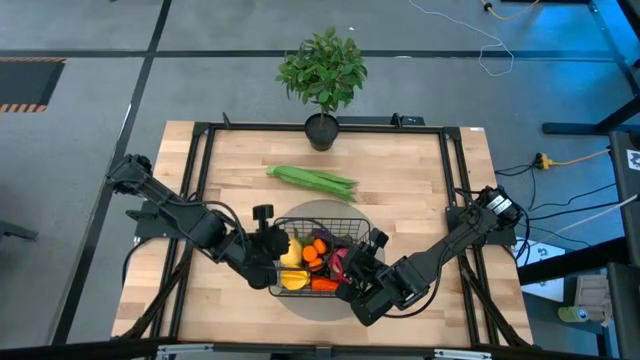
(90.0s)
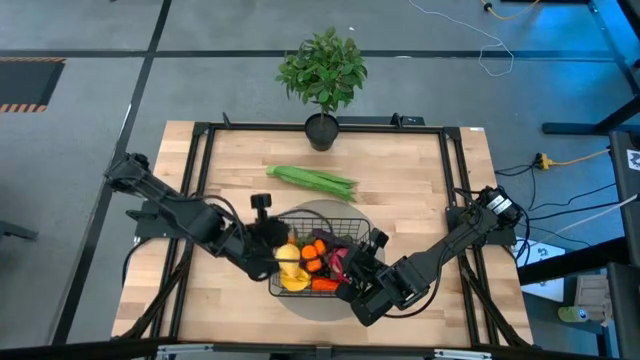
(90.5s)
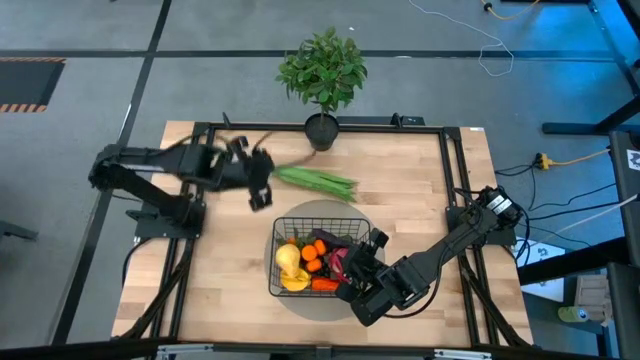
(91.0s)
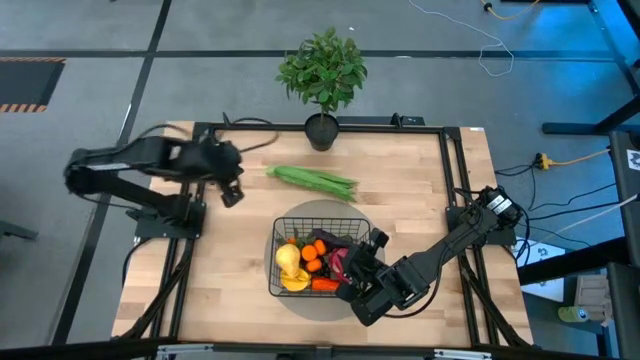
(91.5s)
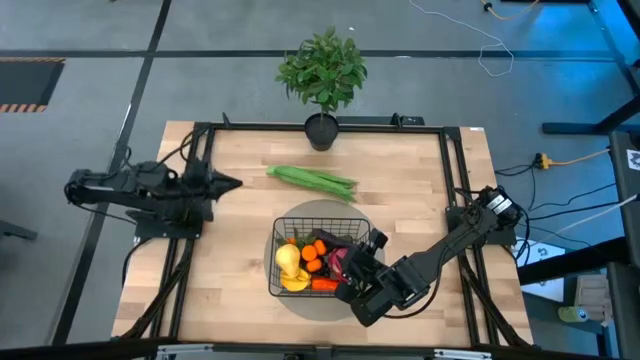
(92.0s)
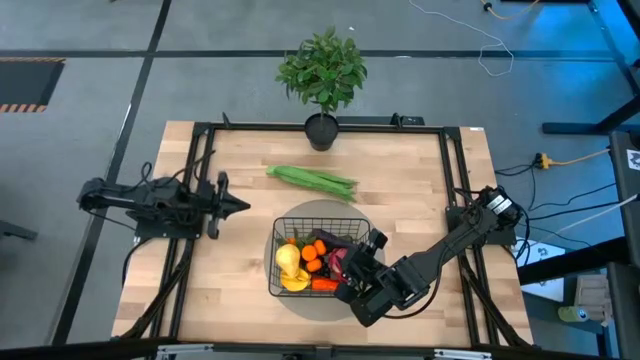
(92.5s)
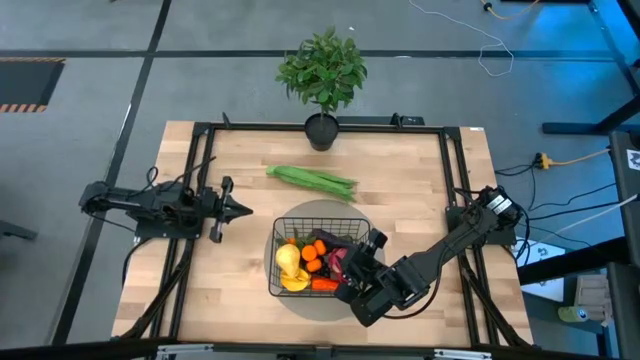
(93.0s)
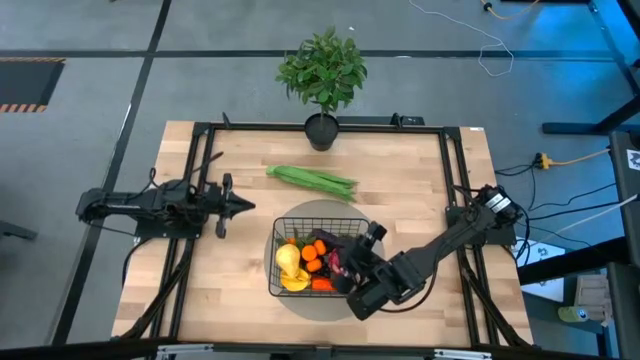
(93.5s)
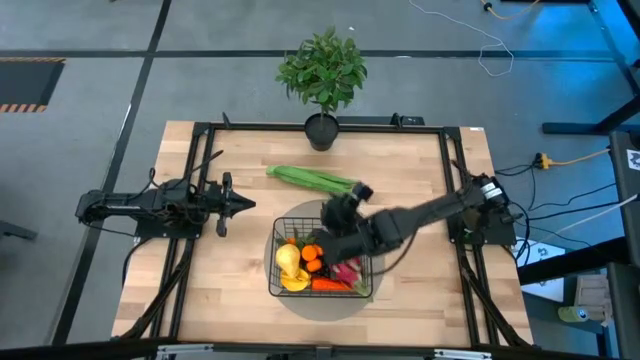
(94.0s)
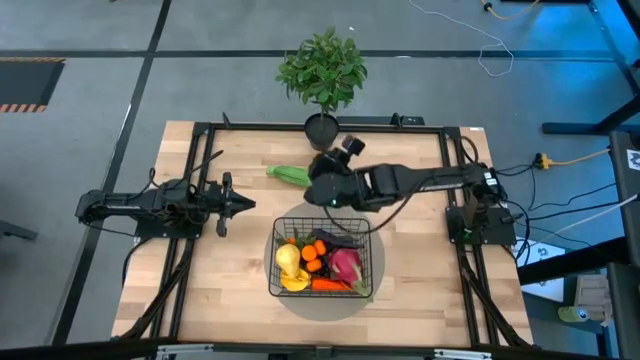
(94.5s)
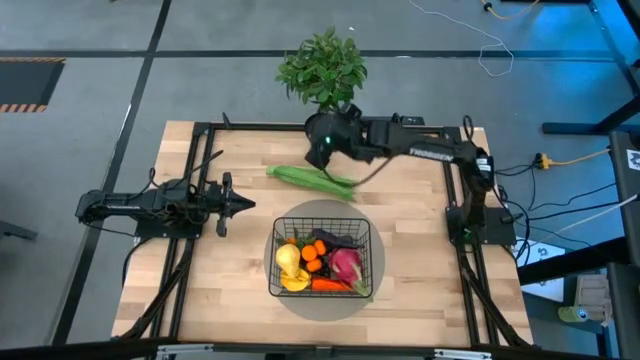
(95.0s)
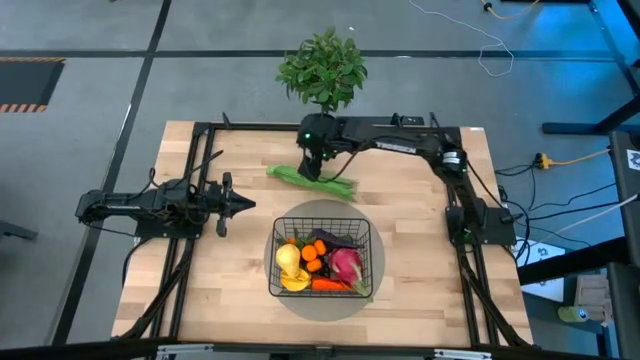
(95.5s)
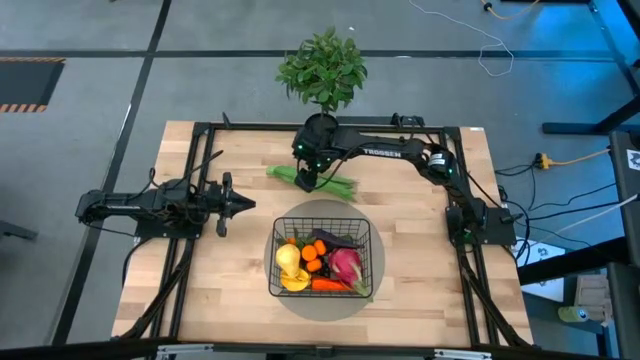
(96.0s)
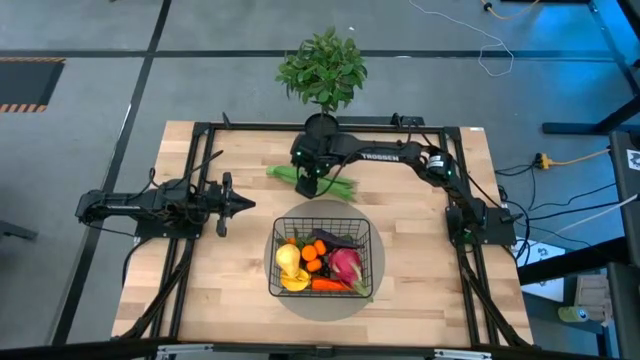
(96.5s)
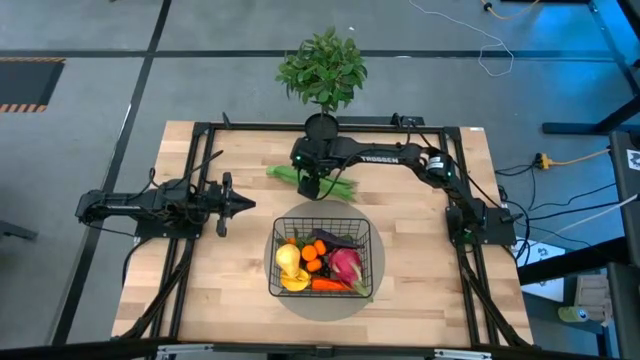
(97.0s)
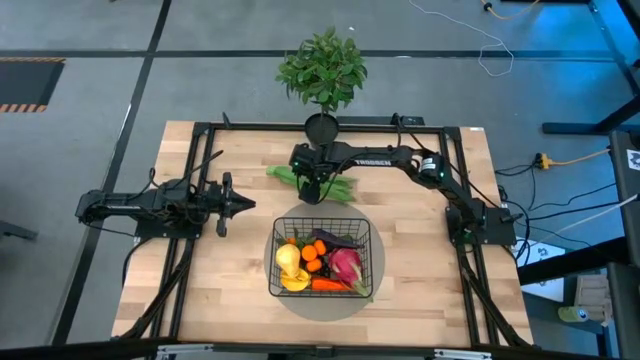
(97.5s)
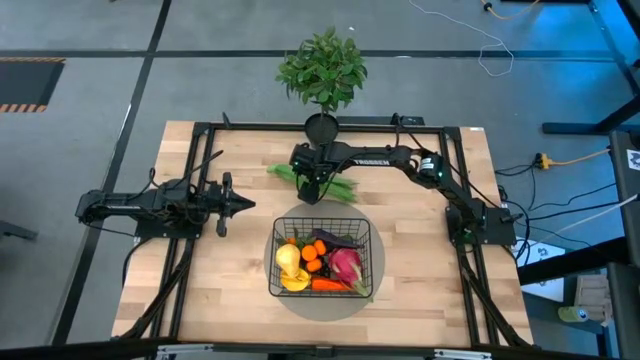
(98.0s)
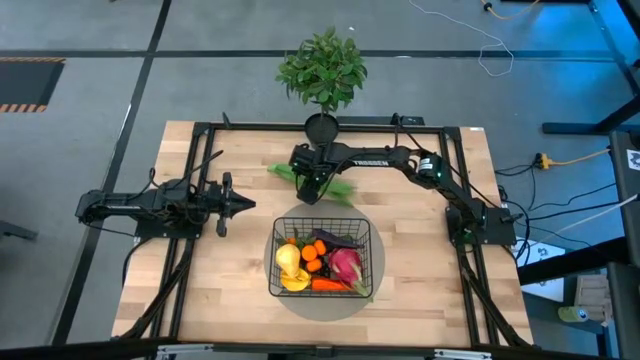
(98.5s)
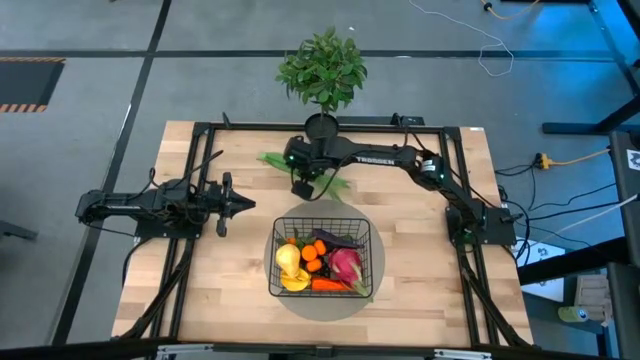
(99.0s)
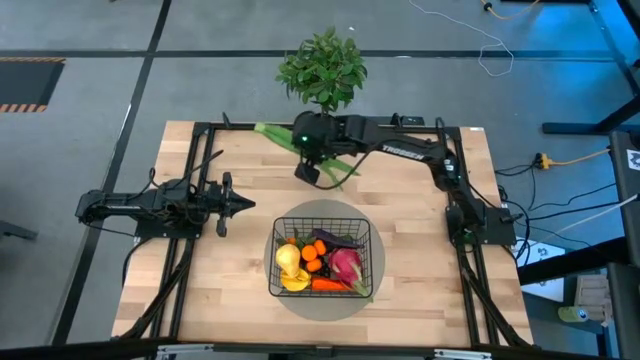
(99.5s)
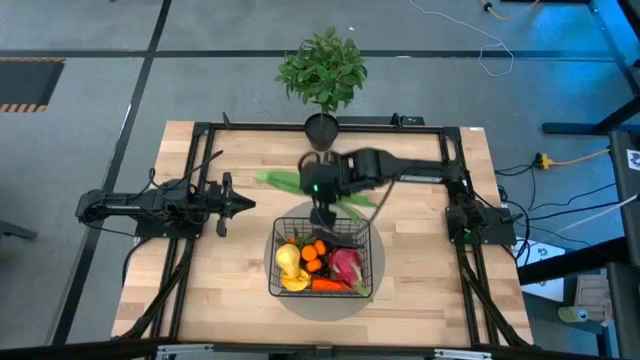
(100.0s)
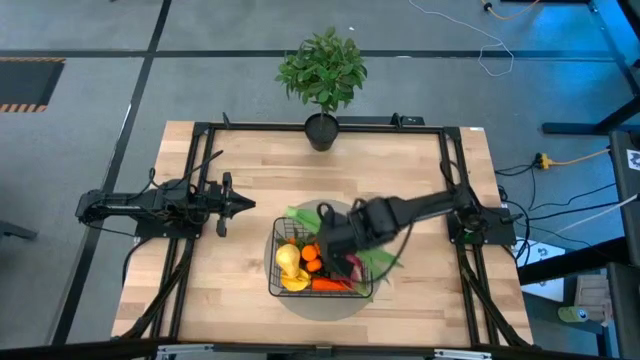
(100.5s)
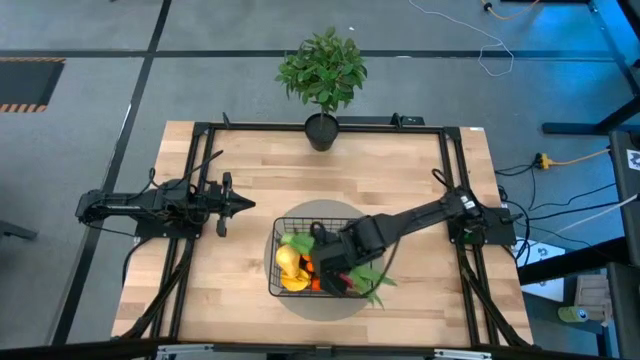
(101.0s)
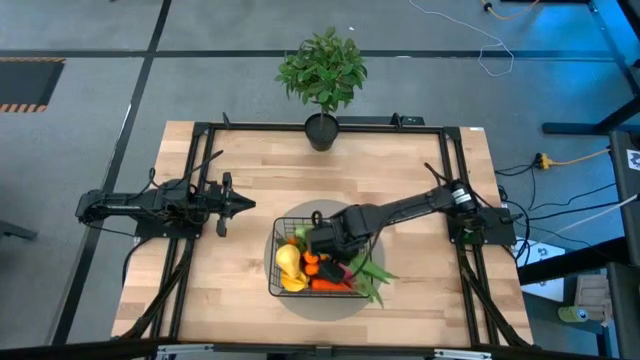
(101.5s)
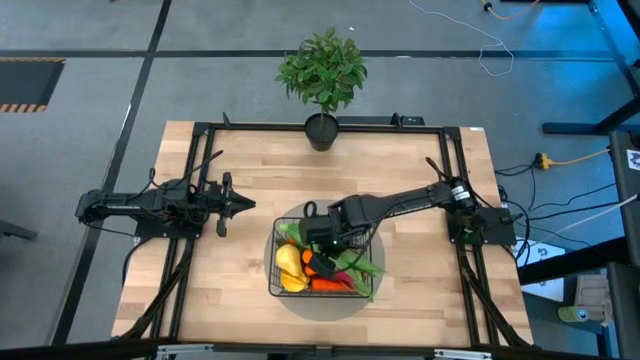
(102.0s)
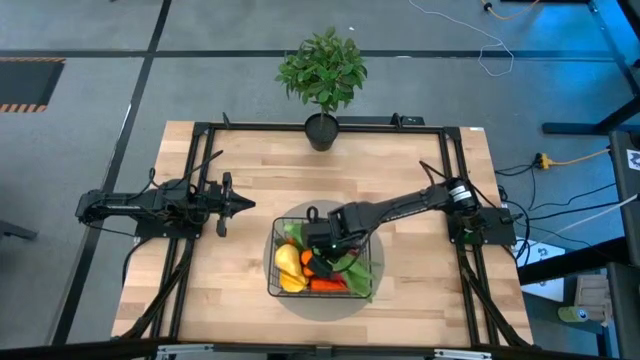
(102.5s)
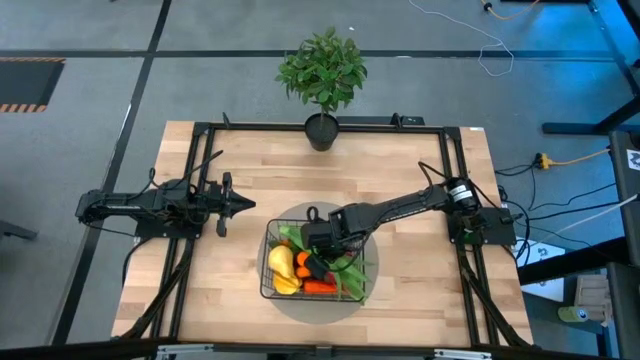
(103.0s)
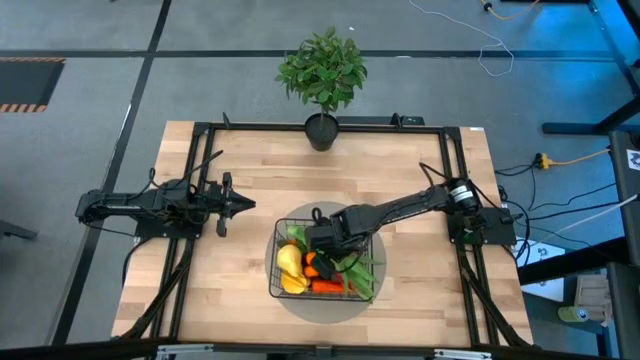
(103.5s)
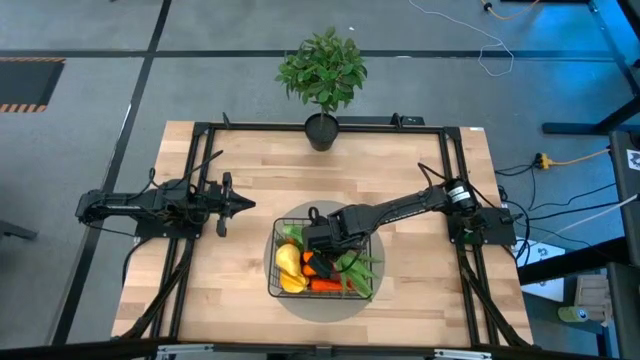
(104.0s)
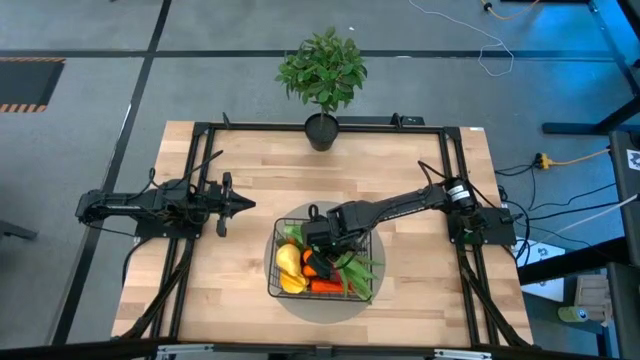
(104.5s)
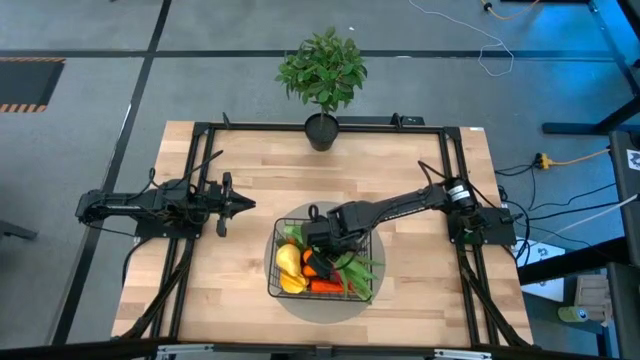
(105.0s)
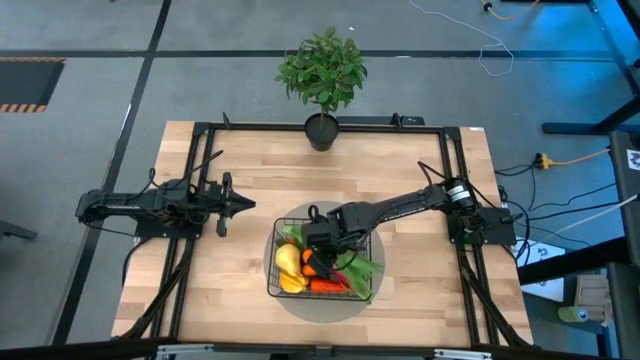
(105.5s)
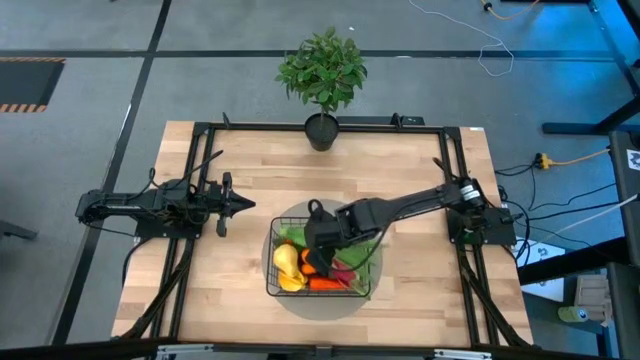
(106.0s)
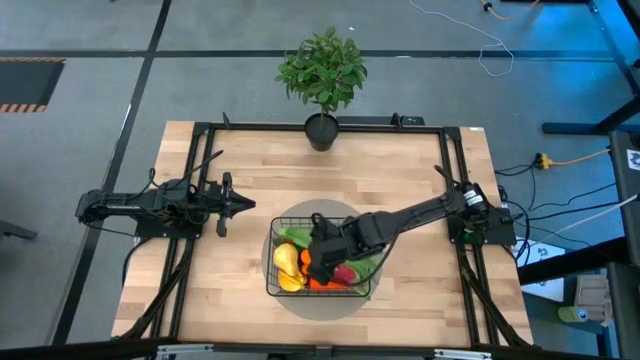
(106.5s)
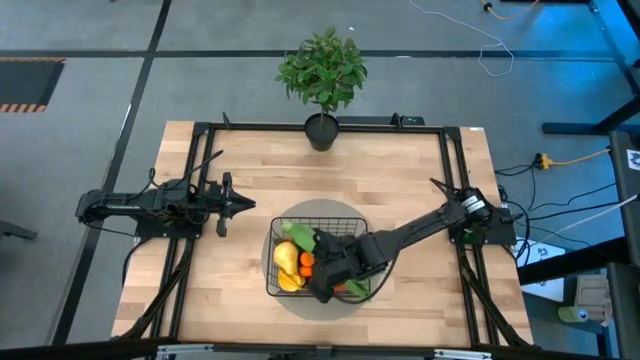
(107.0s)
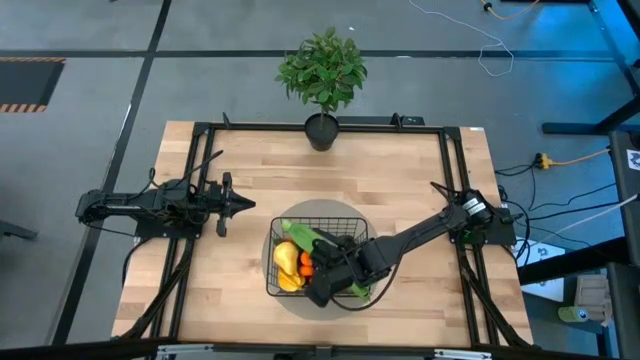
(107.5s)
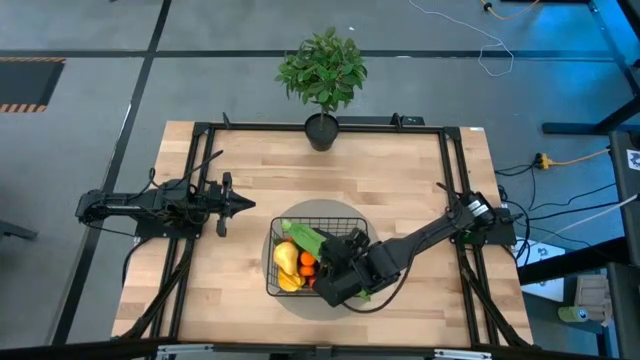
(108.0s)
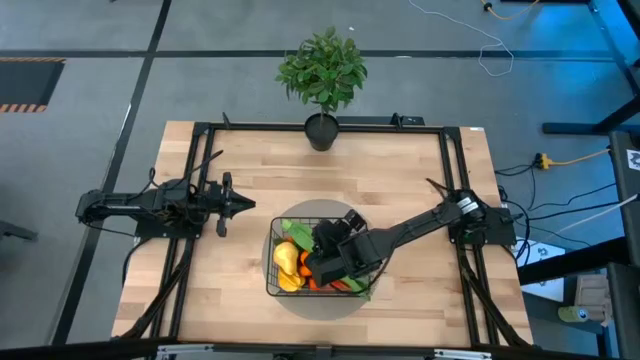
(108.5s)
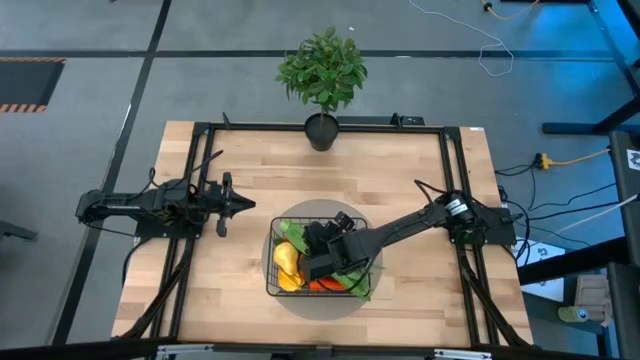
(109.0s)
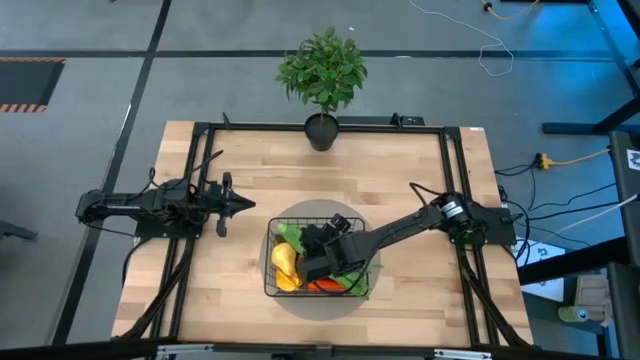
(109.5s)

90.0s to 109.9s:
Task: Build produce basket
Put the lettuce into the black wire basket

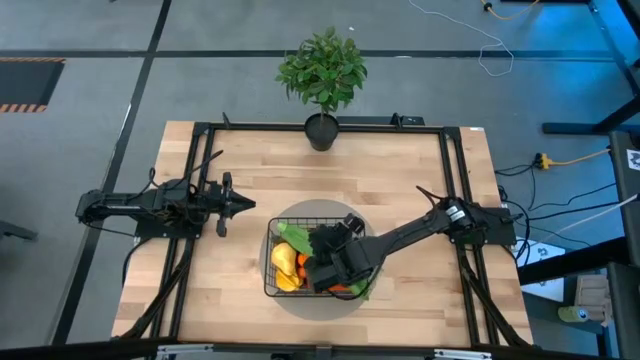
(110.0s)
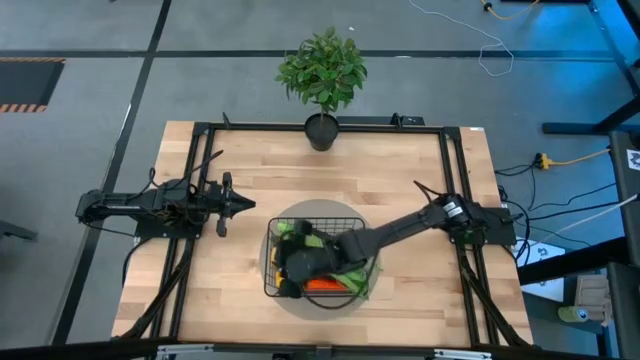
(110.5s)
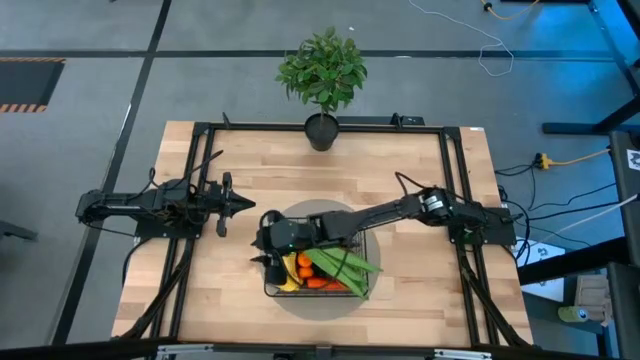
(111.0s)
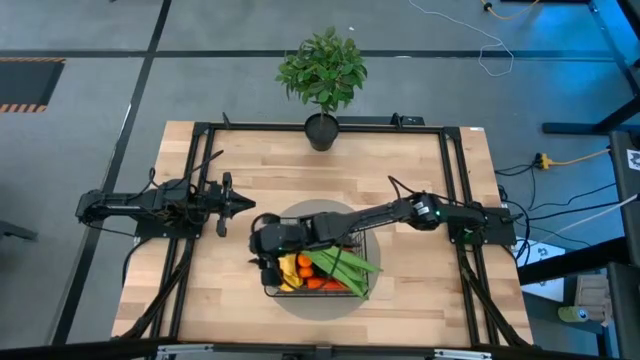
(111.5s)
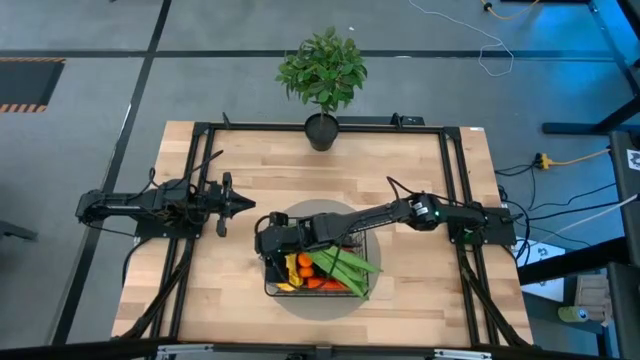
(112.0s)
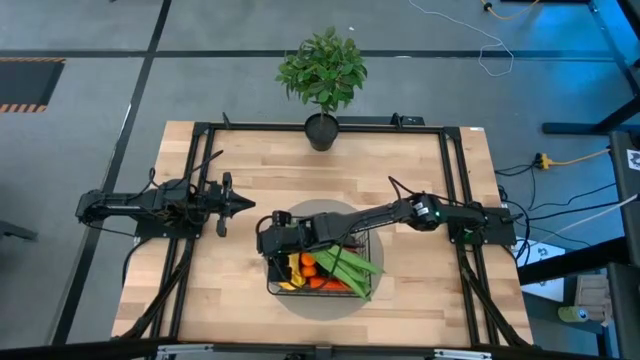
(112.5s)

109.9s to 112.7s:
Adjust the black wire basket
